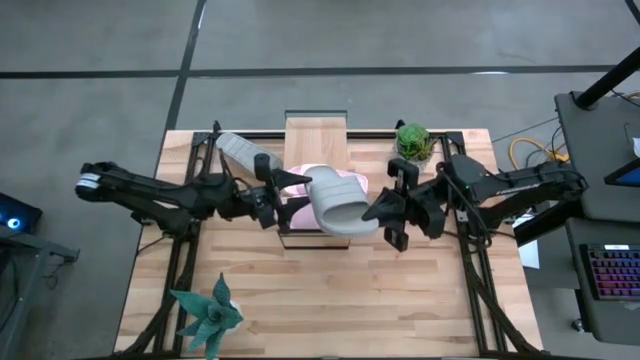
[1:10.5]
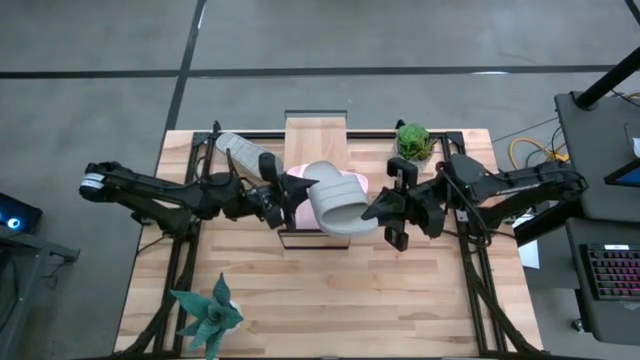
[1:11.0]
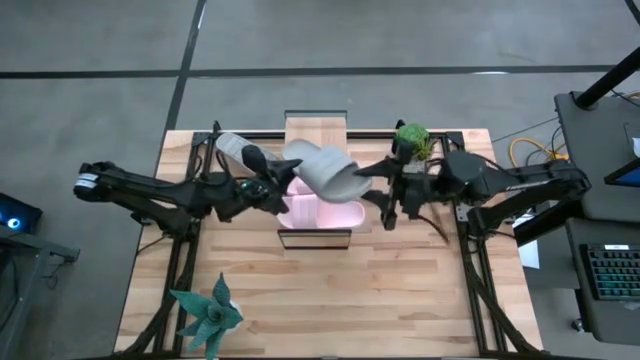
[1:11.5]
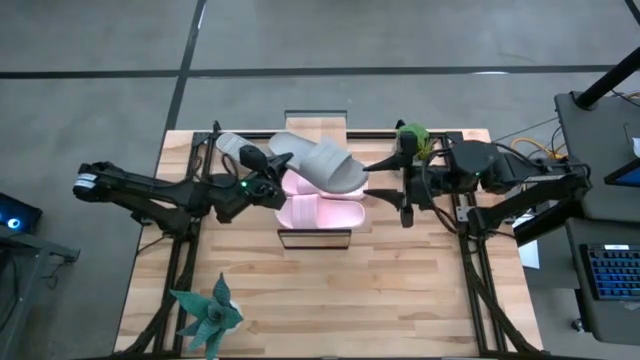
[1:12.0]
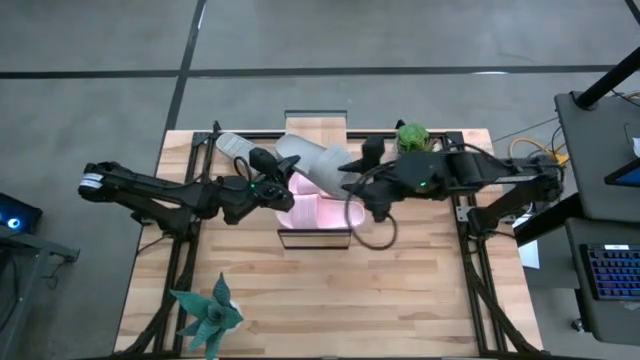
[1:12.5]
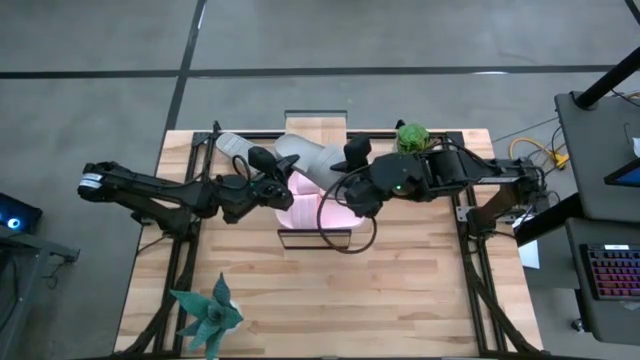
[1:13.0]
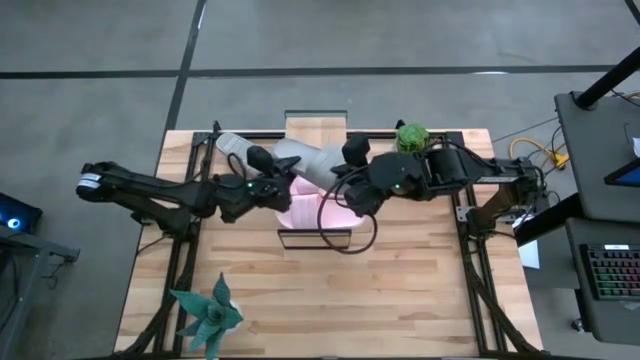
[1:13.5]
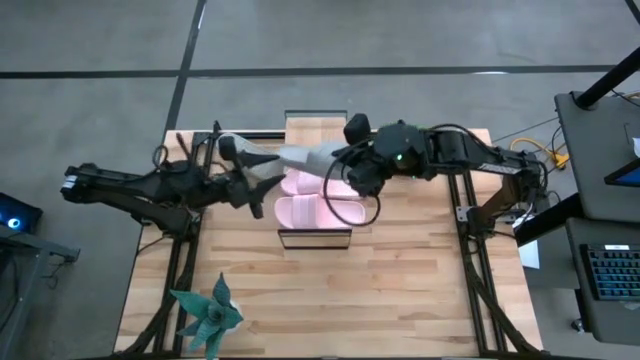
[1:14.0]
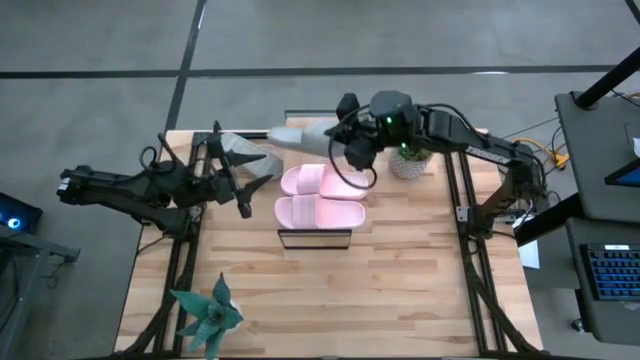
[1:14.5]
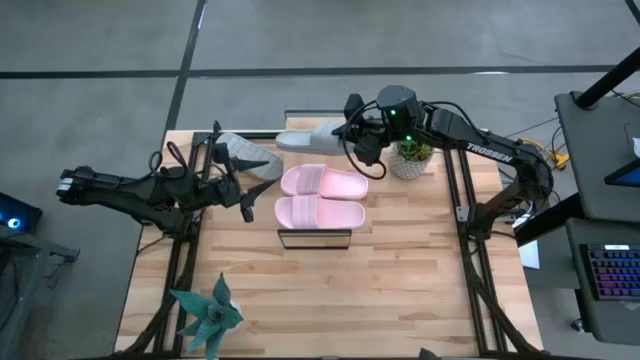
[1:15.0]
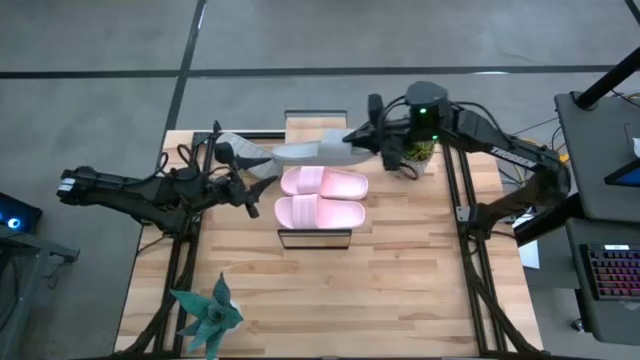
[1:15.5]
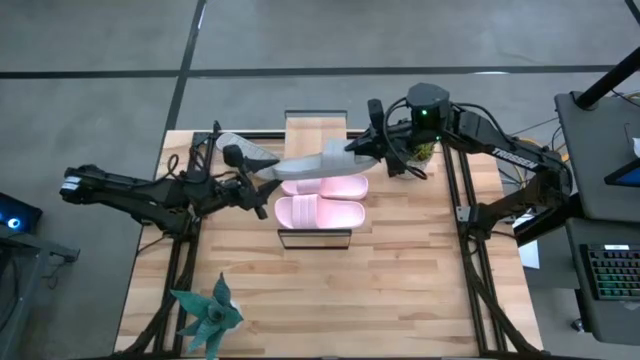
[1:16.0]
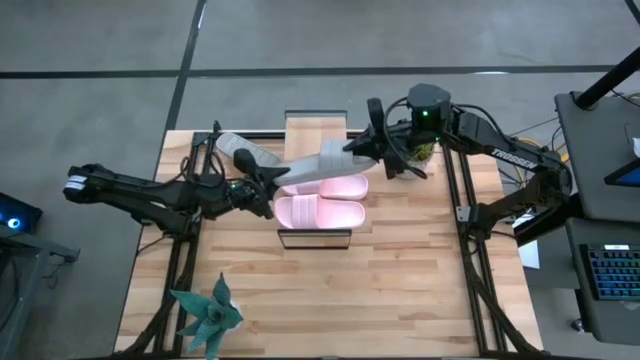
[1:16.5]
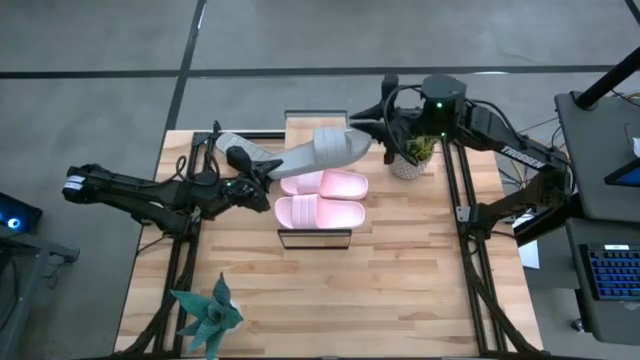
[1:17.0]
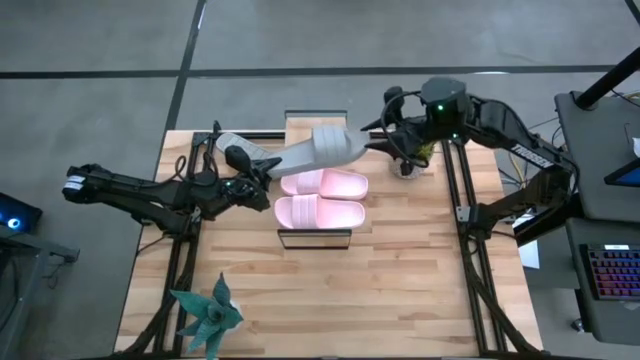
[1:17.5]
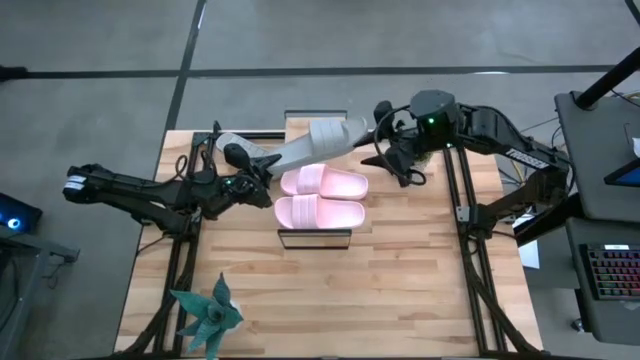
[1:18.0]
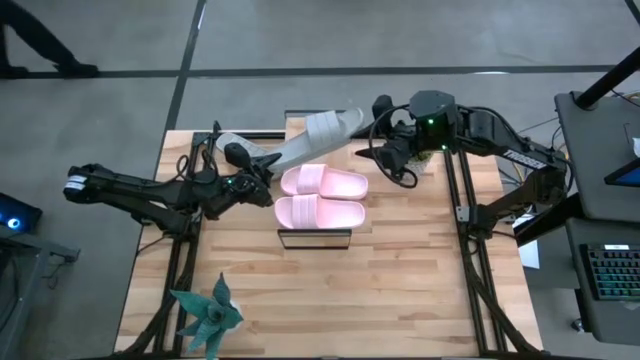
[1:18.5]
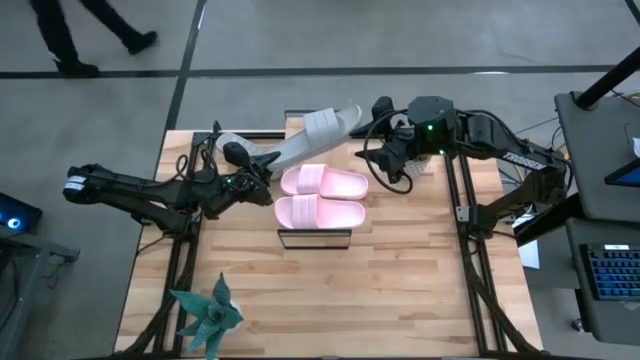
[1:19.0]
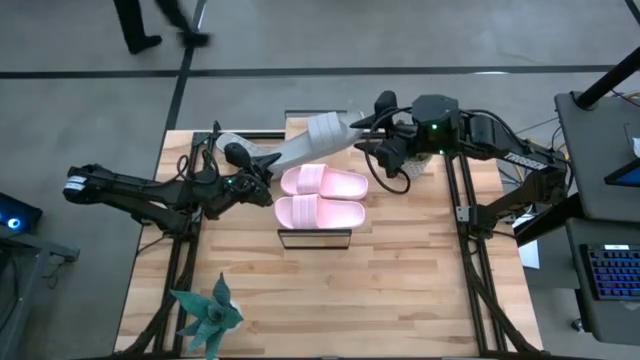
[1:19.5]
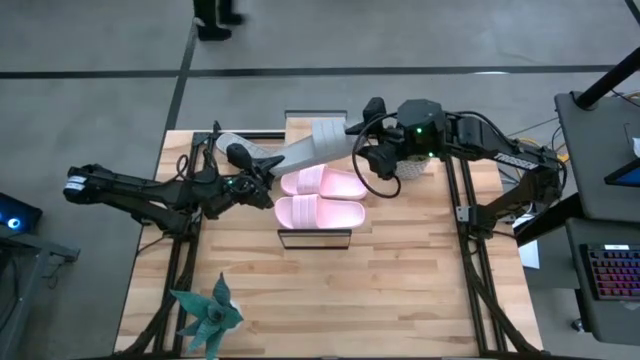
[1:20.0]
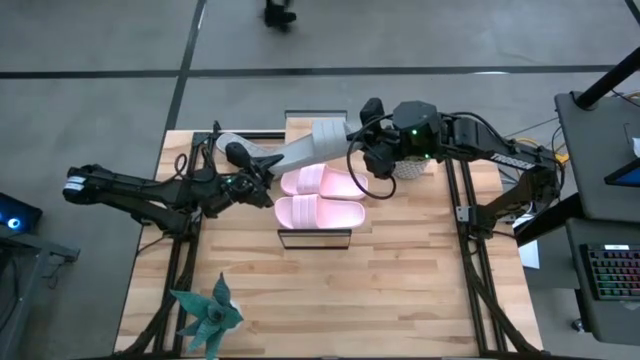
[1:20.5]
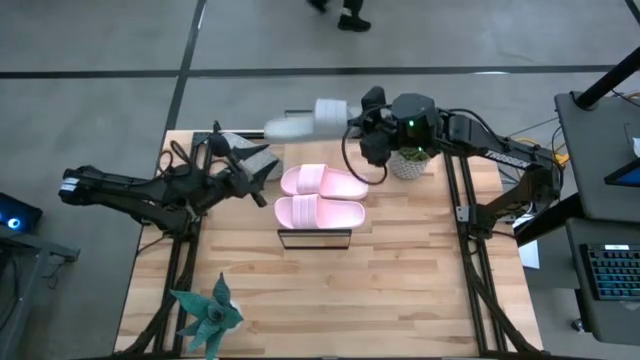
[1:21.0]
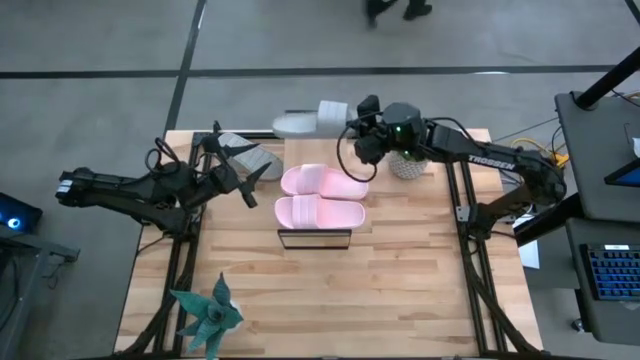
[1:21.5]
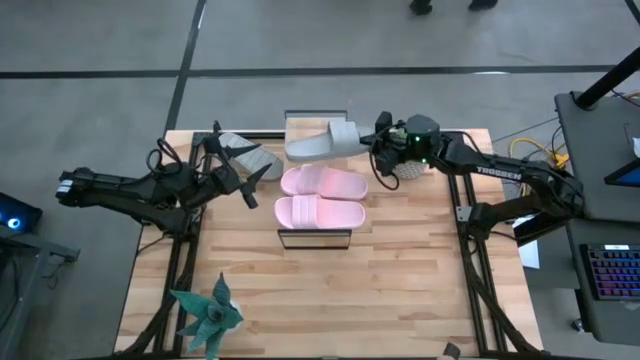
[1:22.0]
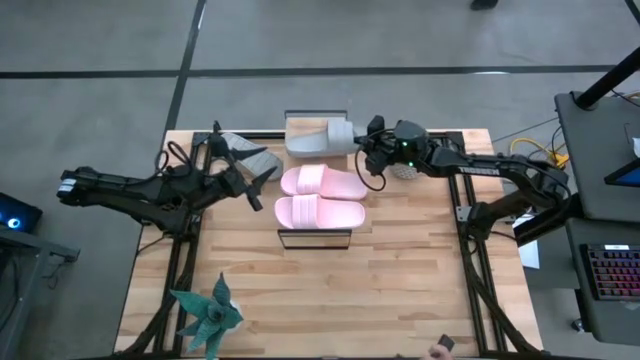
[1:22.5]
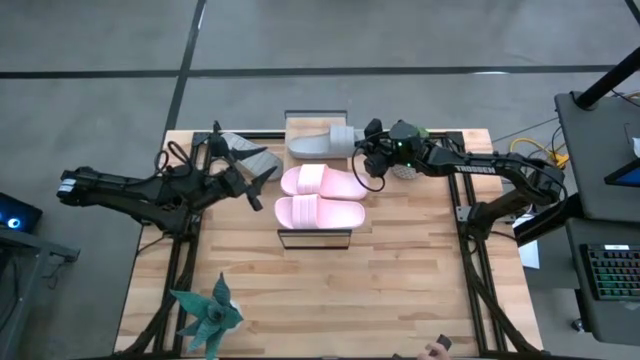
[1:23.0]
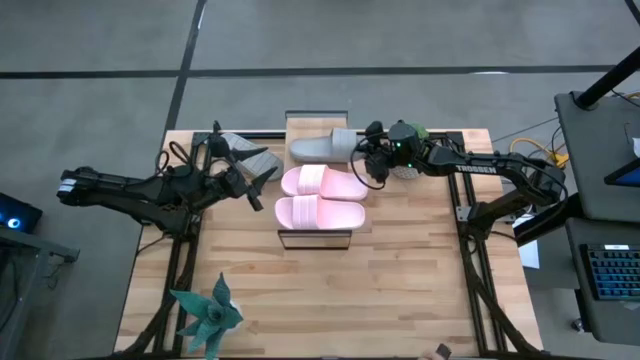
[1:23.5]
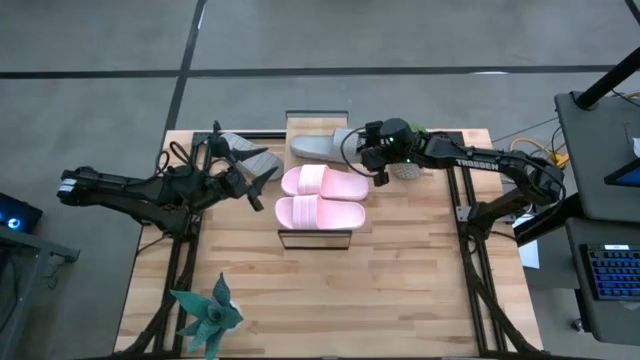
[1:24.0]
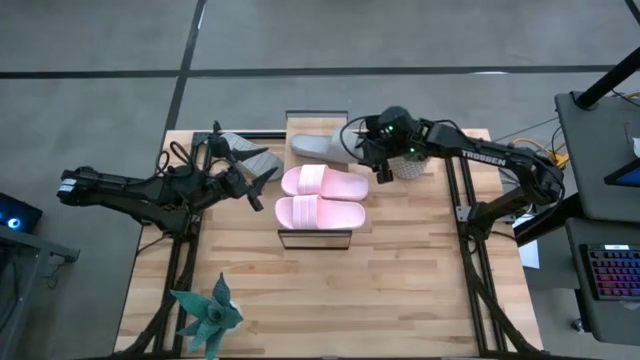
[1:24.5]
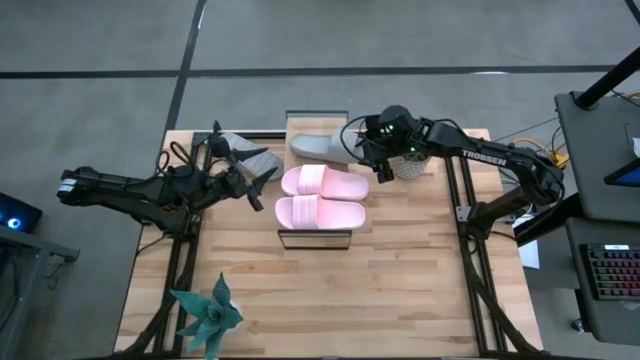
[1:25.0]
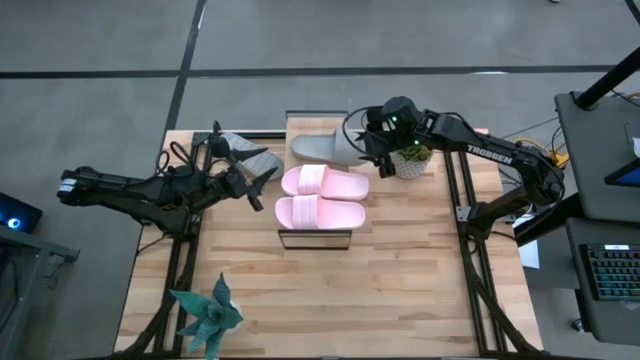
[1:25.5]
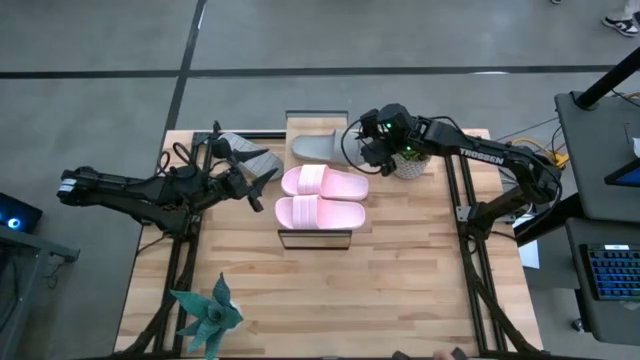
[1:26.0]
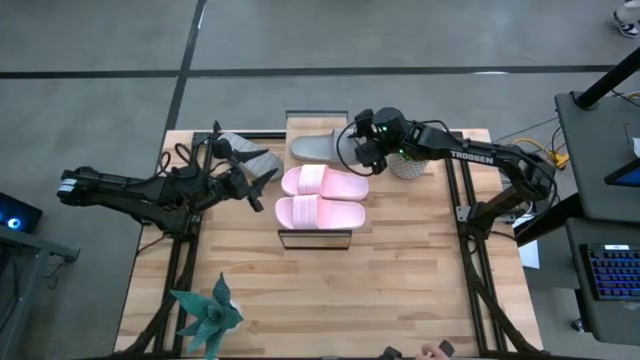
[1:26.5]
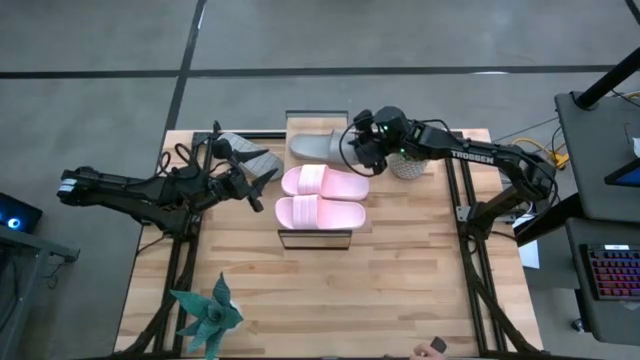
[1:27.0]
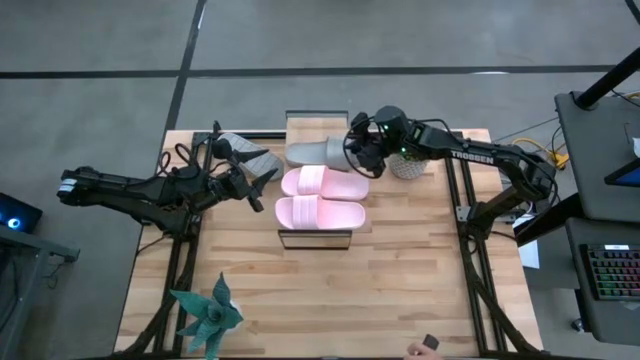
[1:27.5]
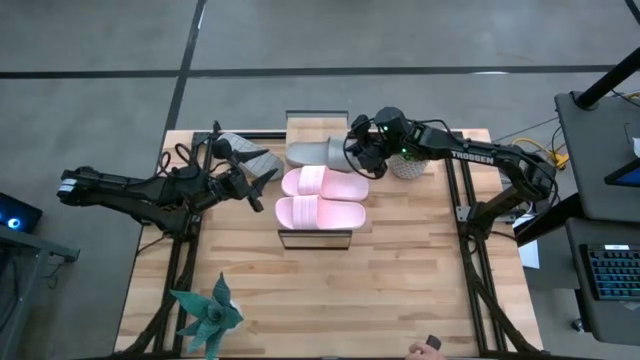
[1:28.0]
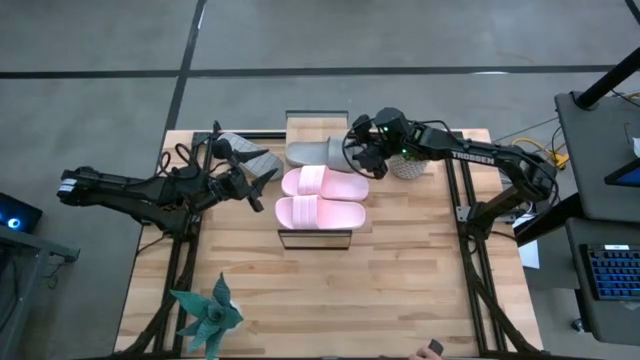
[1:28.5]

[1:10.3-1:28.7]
Task: Pick and place slides into the shelf
Put the bottom gray slipper on the shelf
